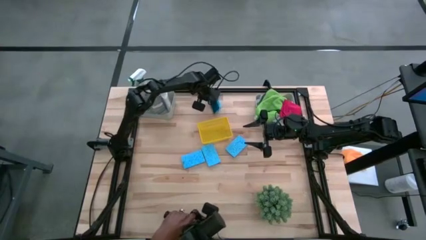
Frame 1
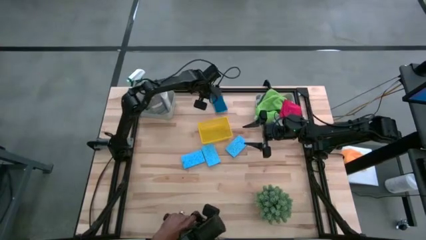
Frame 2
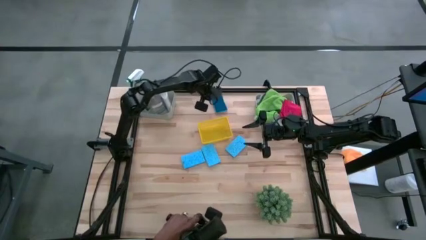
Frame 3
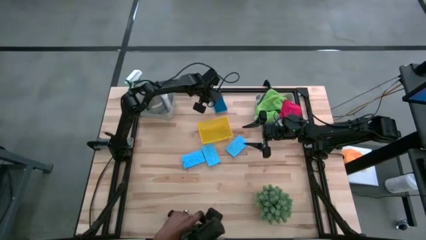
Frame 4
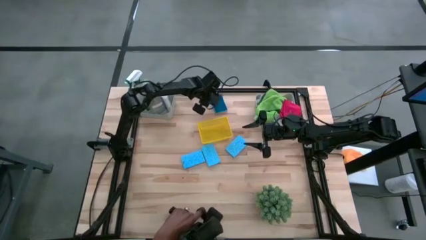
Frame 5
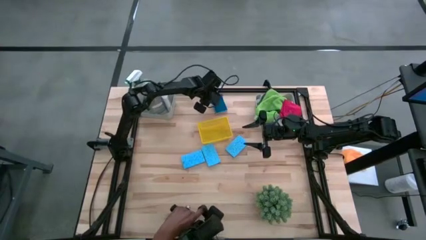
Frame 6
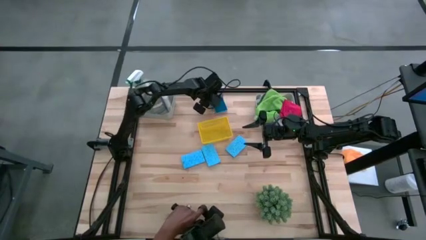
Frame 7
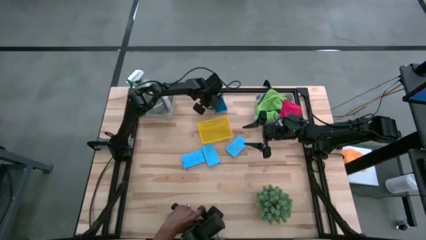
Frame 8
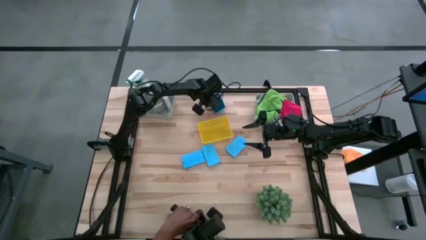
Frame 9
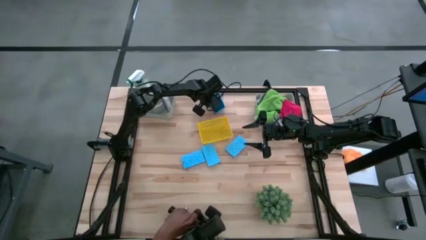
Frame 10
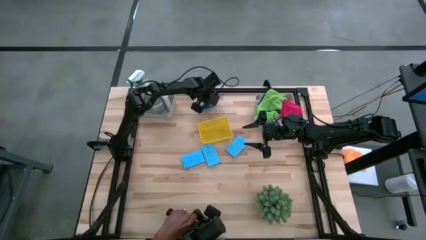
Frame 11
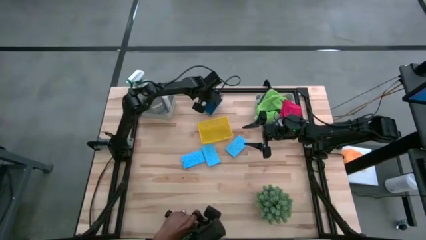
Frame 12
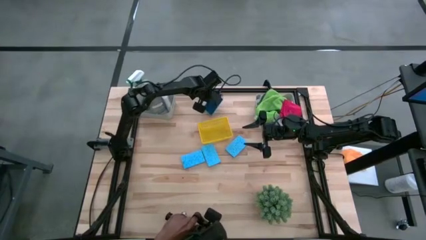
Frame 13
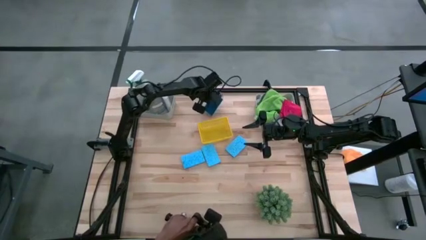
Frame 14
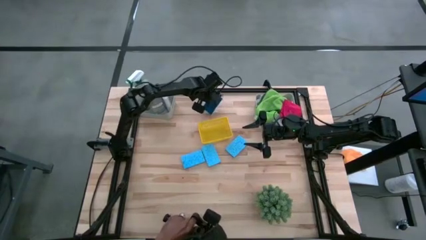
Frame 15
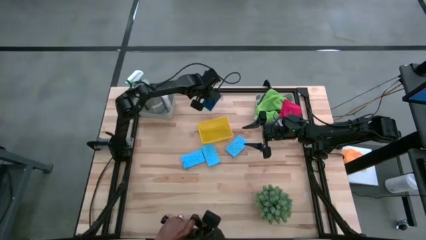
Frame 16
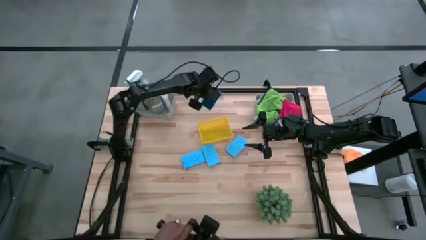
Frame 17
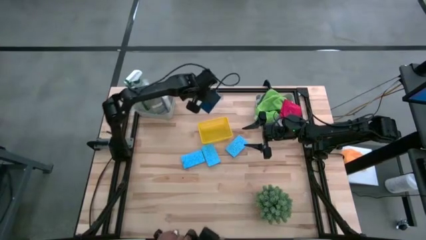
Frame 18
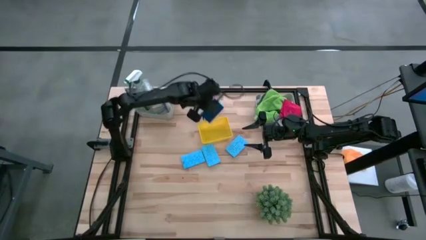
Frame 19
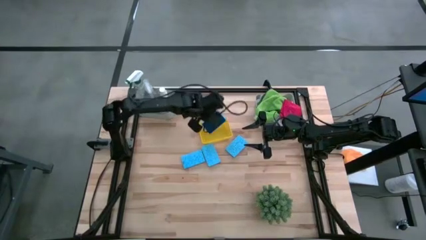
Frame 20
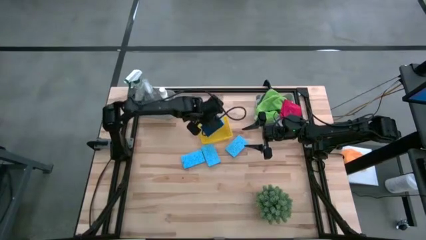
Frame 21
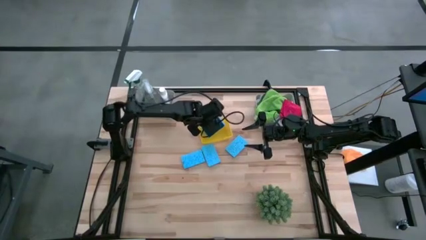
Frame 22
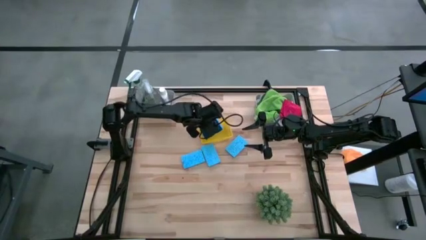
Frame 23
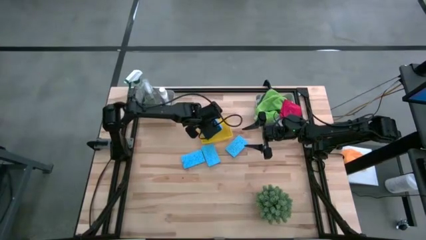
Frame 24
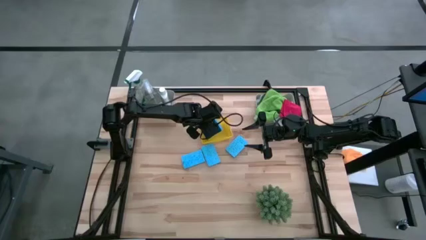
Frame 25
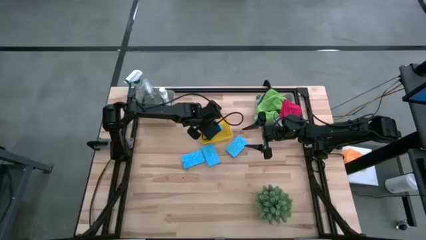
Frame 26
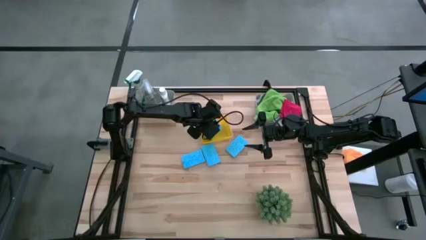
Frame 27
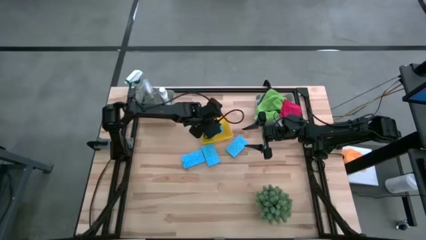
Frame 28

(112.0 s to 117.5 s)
Task: Pick & Place Kitchen Items
Put the blue sponge into the yellow bin

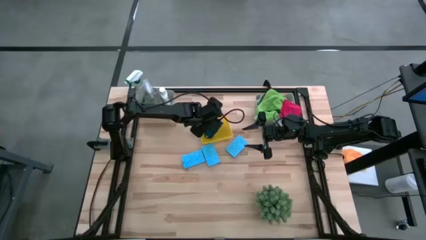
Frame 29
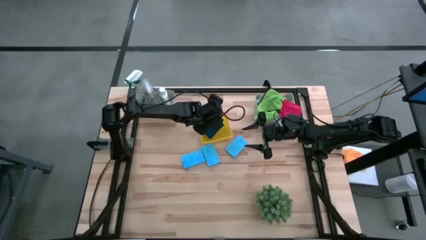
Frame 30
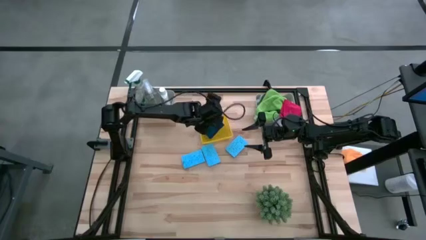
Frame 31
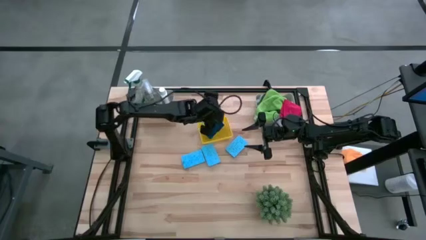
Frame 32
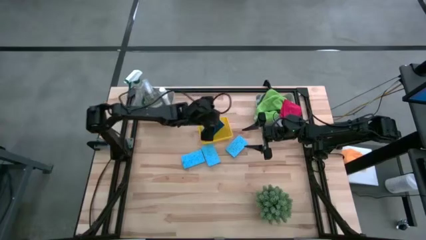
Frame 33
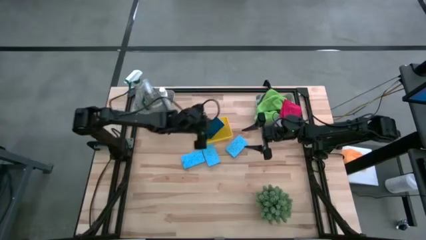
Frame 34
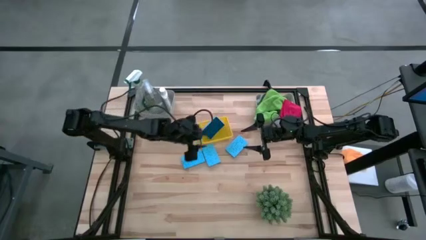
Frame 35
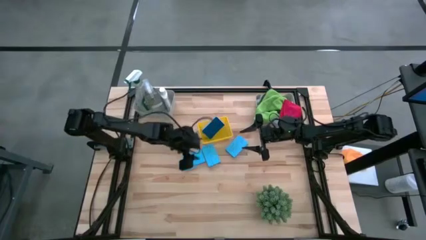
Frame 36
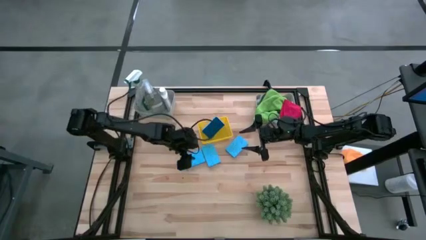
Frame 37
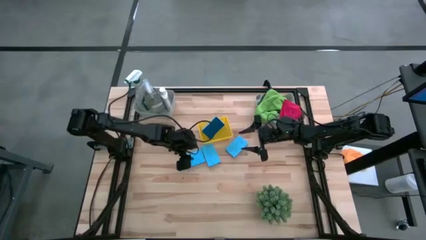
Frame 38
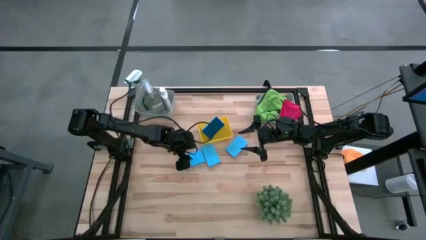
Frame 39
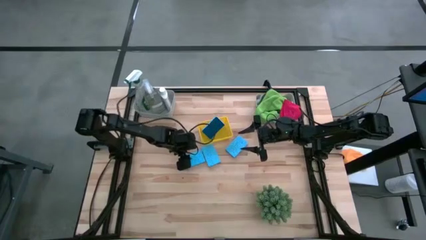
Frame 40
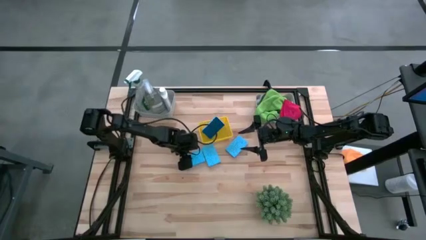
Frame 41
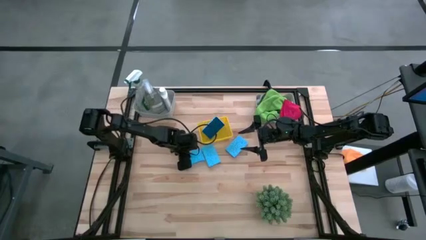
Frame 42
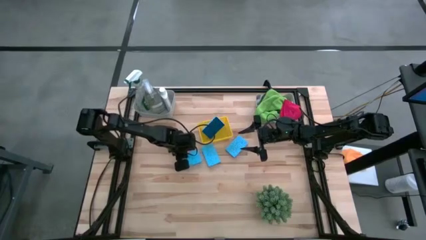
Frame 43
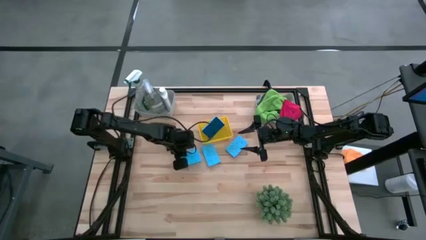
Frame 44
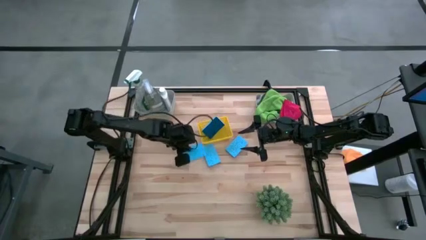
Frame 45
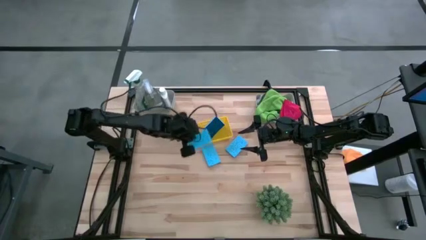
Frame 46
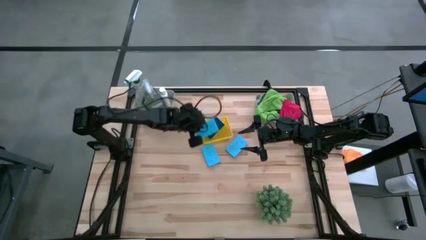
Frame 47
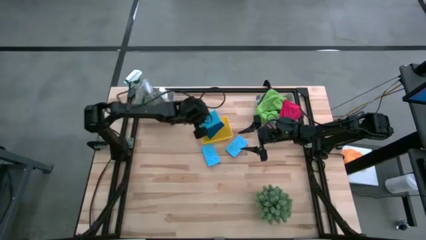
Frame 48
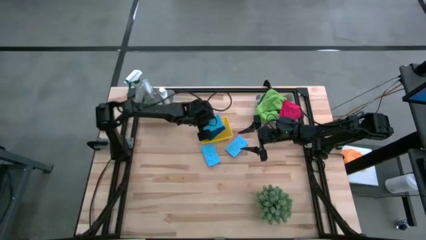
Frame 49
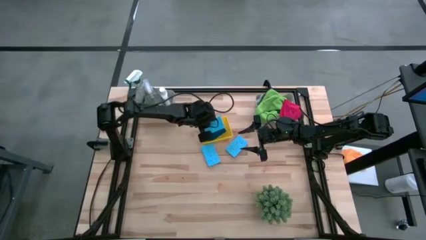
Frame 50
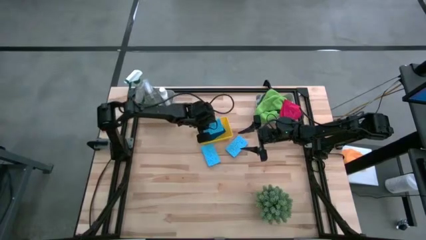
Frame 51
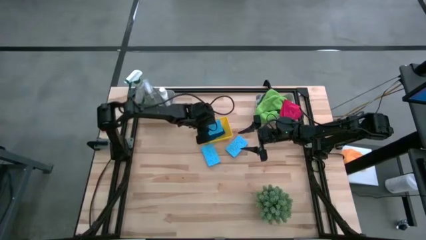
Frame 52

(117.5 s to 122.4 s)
Put the blue sponge into the yellow bin

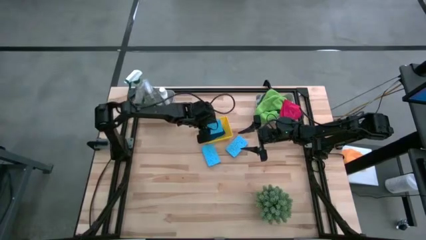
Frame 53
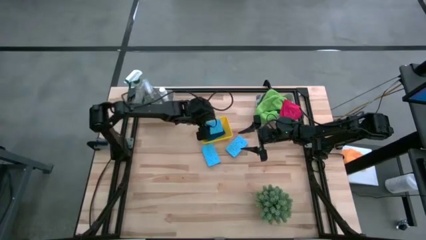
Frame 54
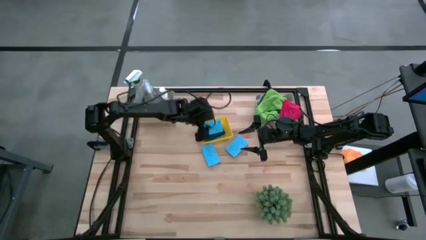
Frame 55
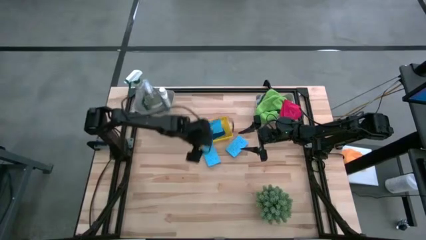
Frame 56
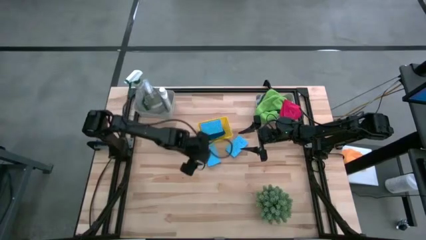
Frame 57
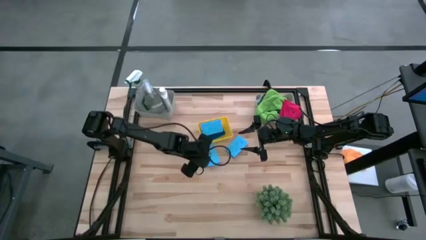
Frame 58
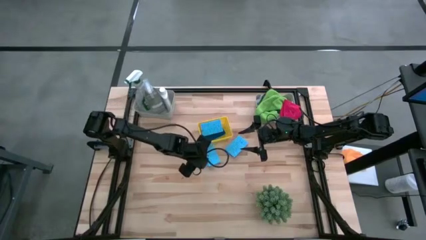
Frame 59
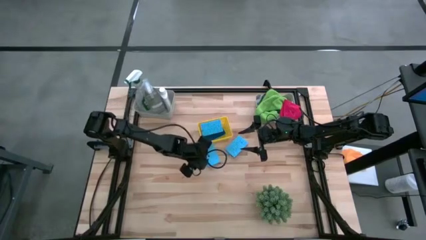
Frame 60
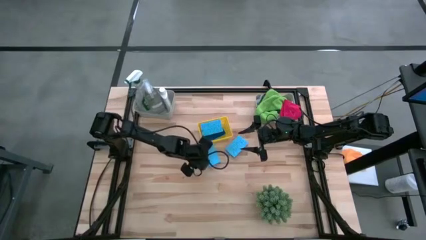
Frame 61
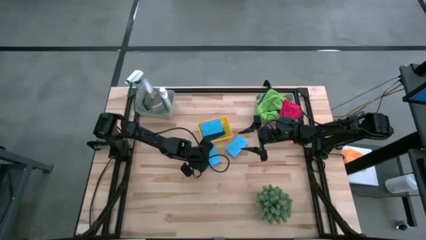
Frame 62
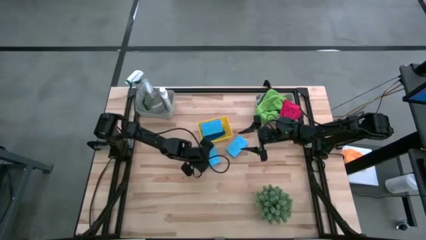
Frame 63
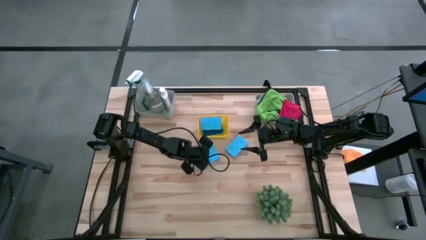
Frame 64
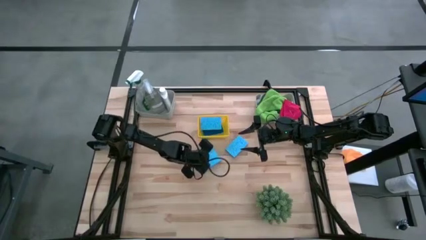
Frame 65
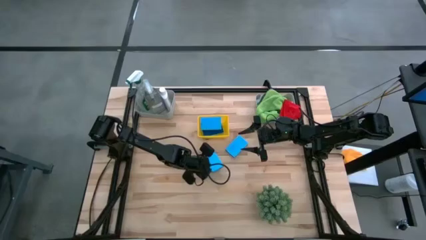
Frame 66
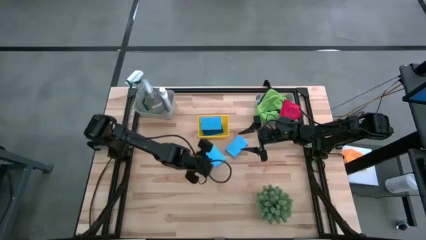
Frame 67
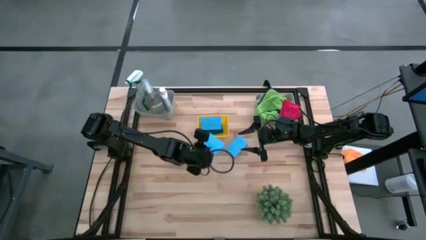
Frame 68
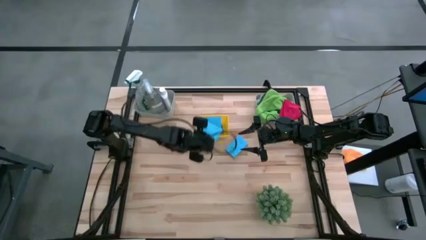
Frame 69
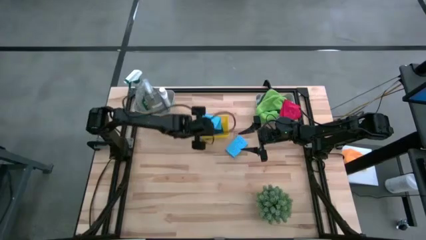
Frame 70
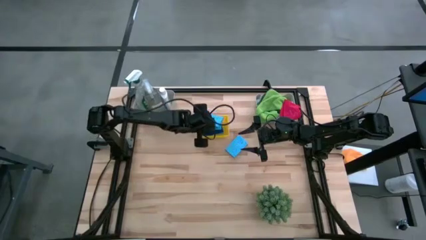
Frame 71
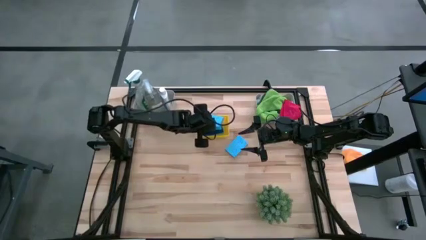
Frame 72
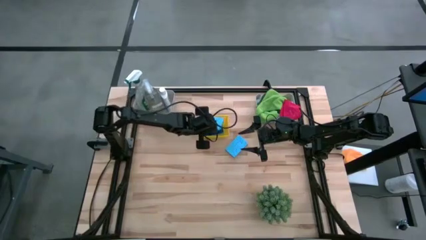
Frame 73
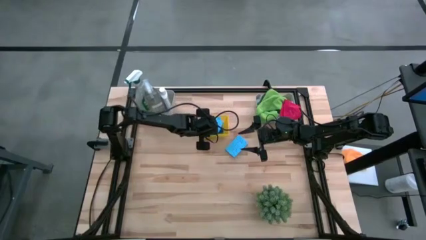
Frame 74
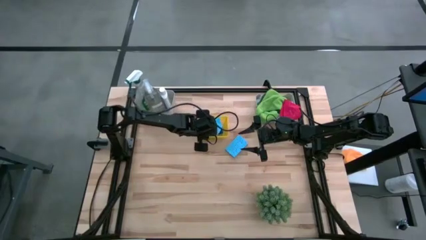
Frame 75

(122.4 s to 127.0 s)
Put the blue sponge into the yellow bin
